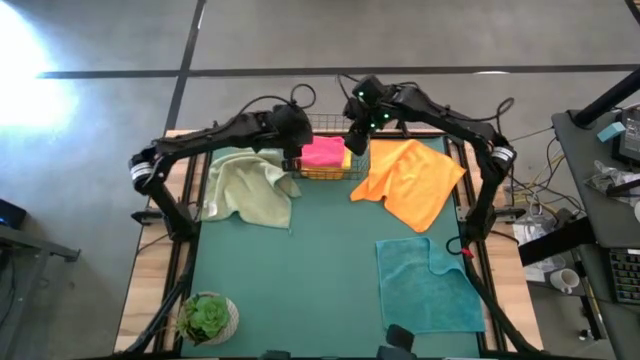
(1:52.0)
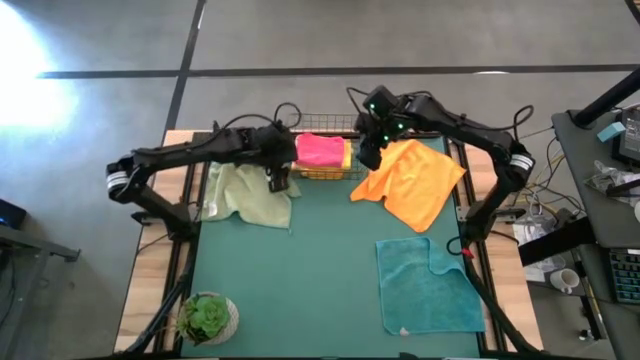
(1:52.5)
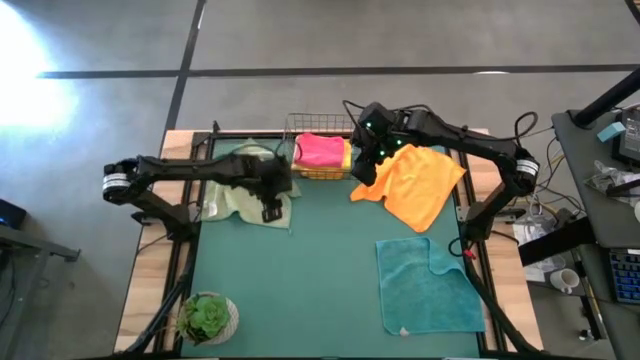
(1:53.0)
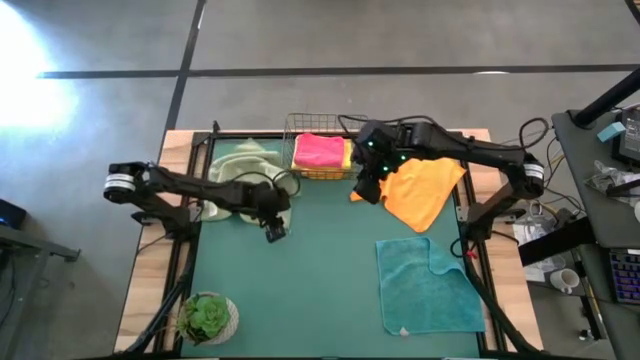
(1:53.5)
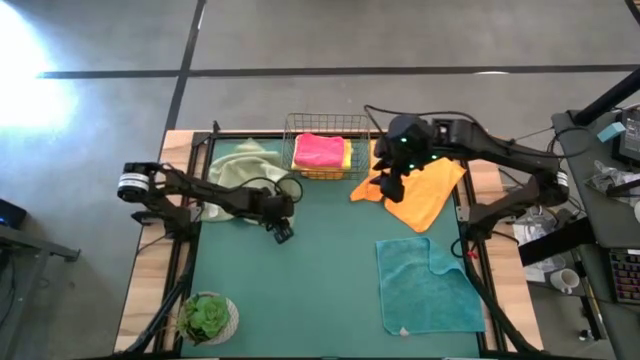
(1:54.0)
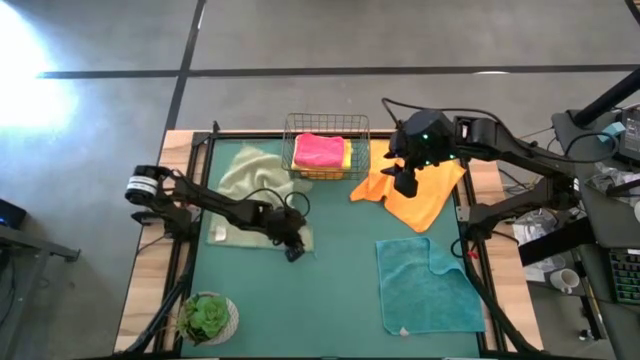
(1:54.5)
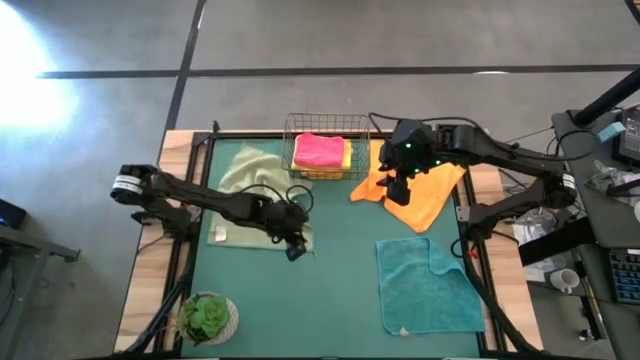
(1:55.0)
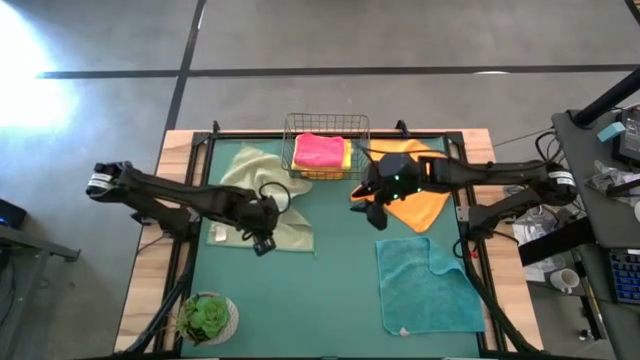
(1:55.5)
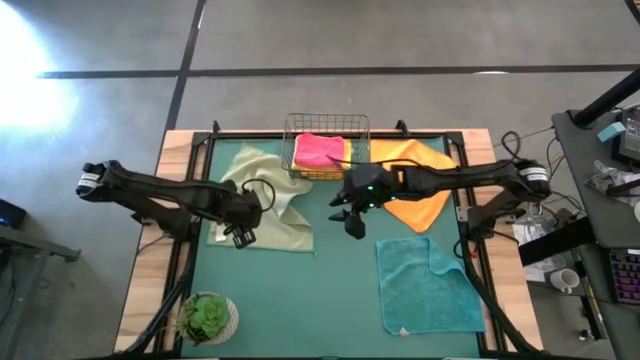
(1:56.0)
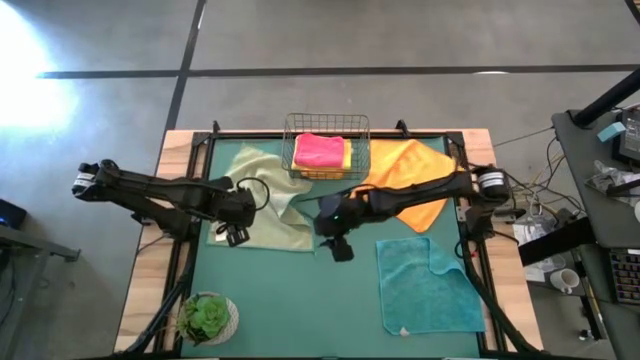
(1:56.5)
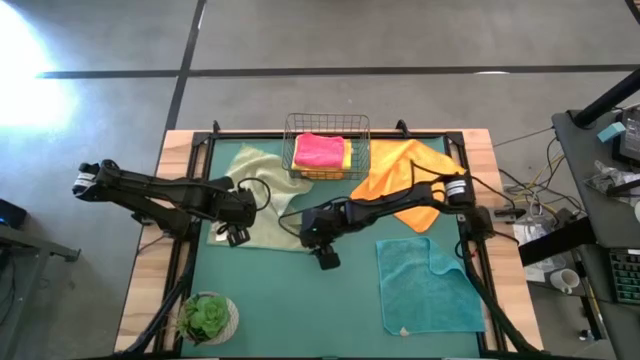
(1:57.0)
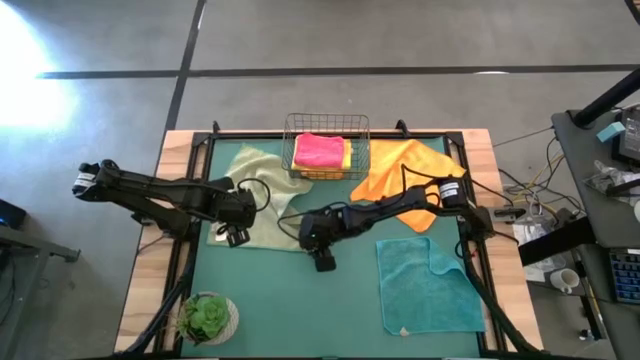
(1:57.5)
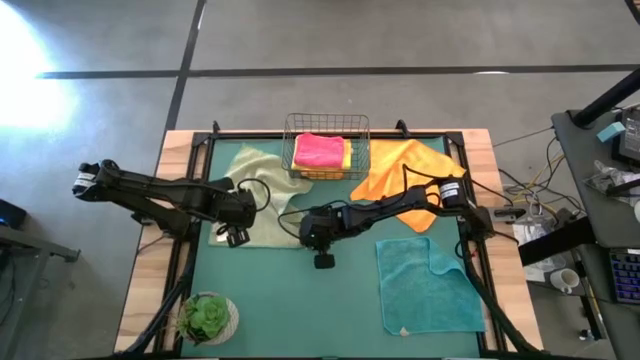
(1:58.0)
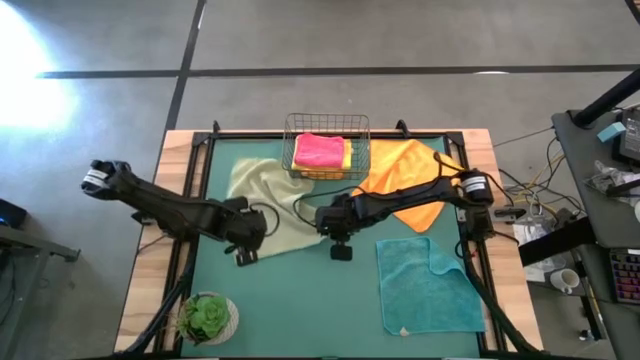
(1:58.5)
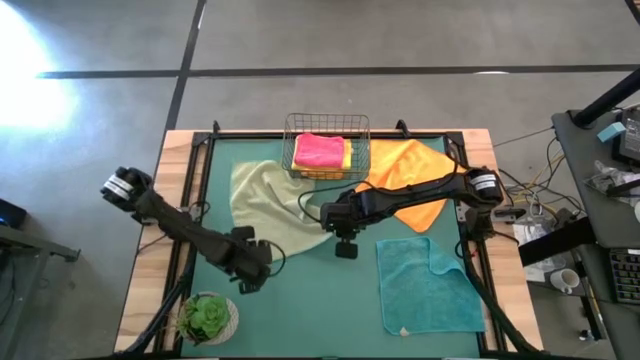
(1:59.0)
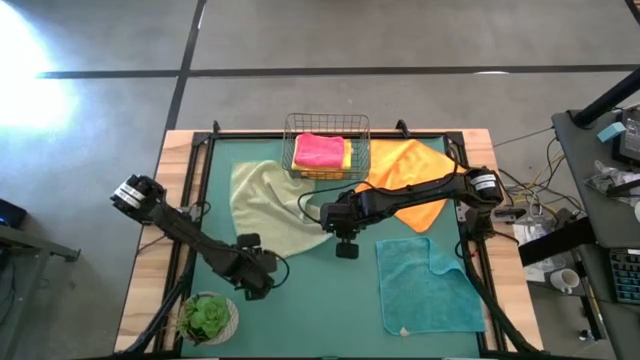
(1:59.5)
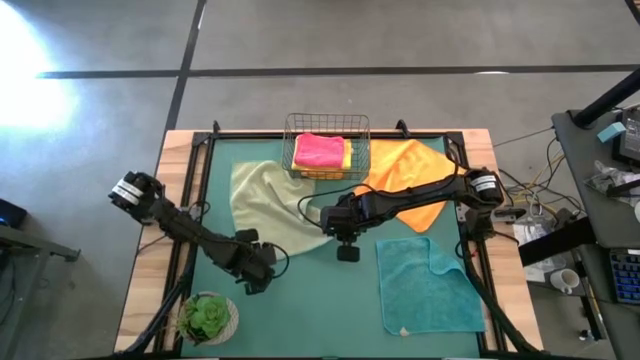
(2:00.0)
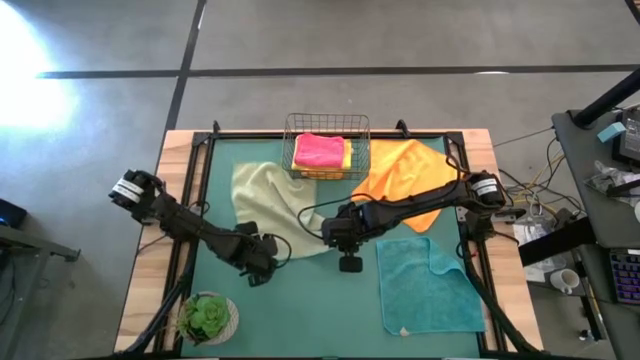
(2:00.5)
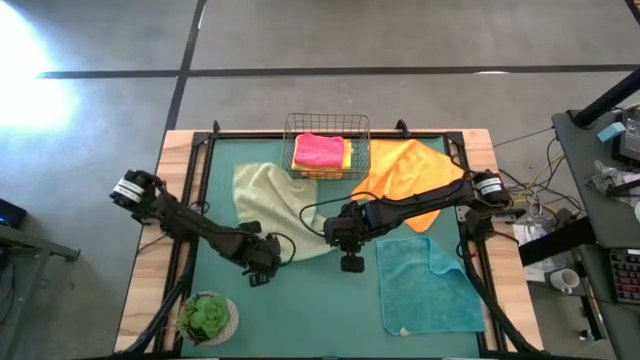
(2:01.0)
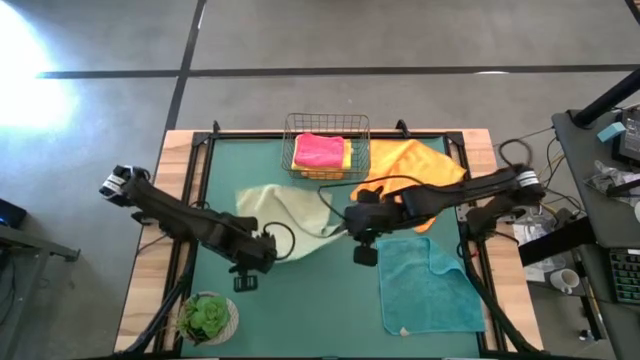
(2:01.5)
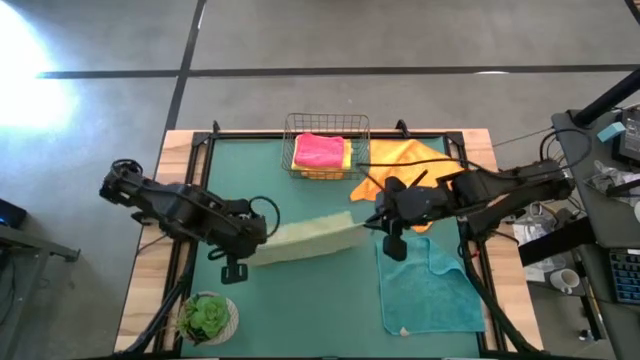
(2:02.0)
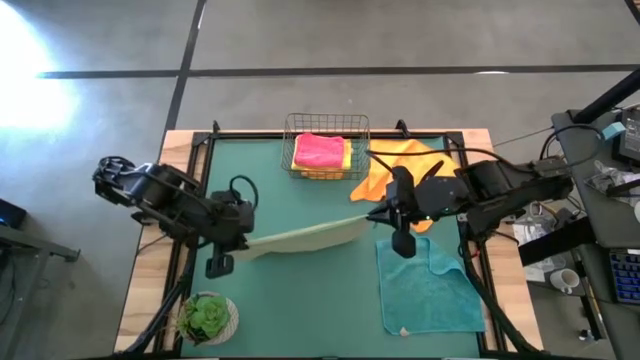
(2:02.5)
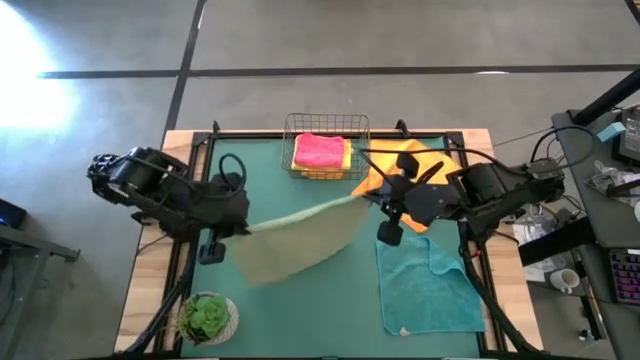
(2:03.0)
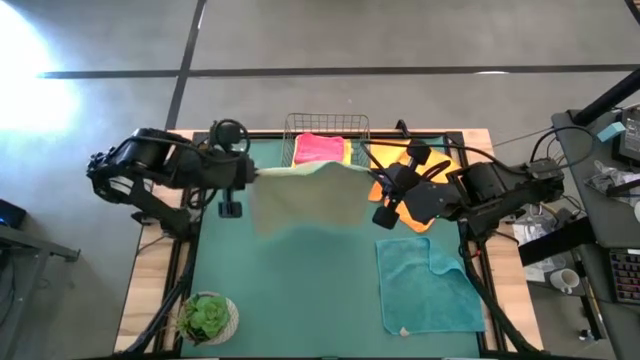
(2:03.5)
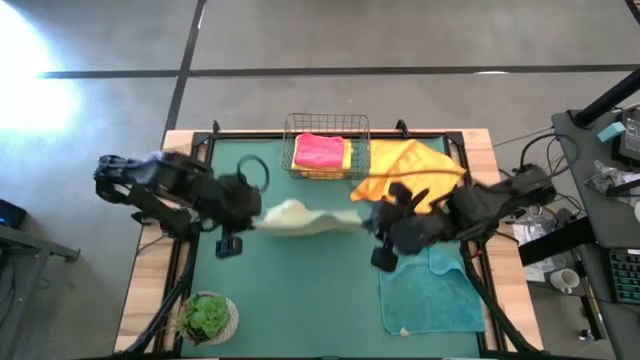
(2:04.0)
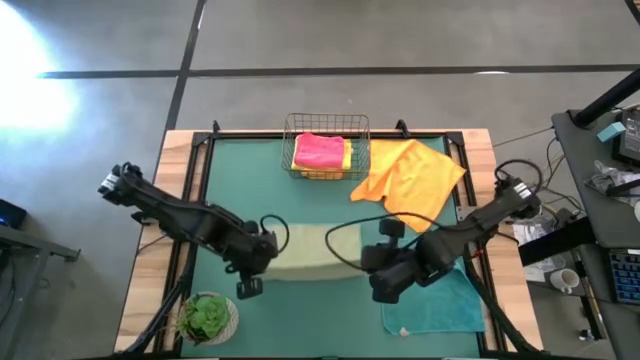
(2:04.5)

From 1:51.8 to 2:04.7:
Task: Fold microfiber towels
Fold the green microfiber towel

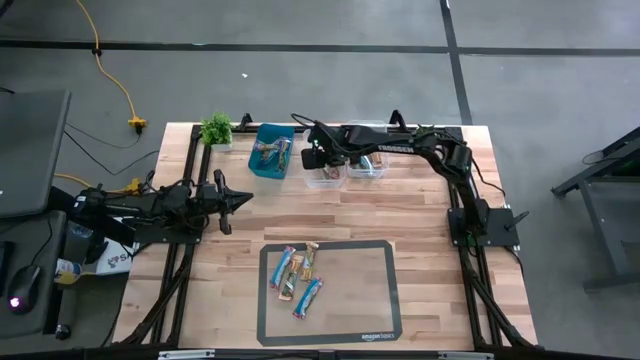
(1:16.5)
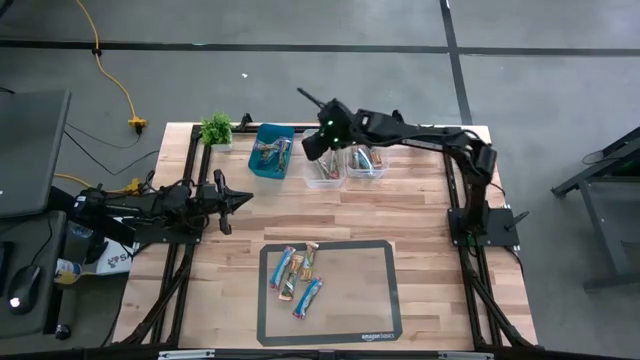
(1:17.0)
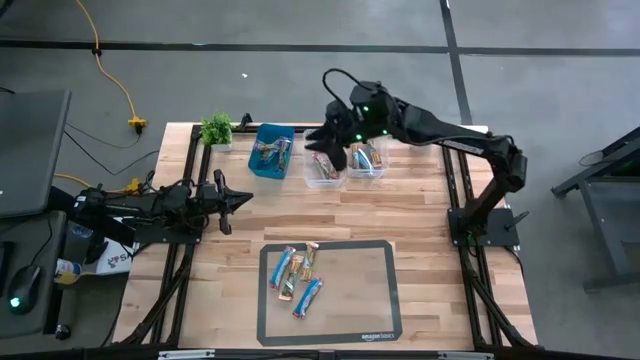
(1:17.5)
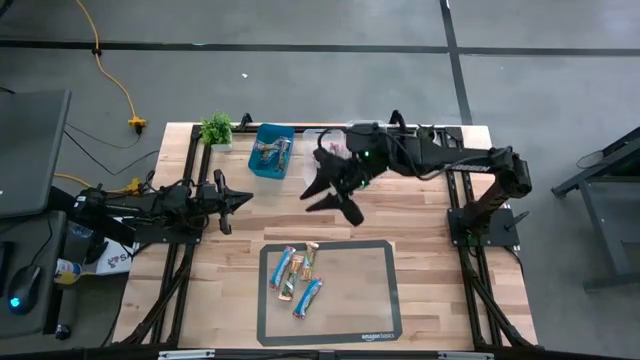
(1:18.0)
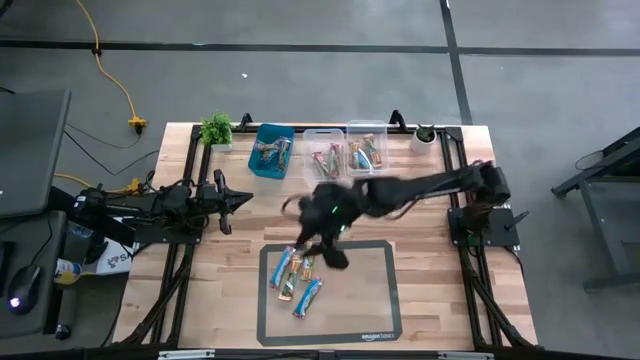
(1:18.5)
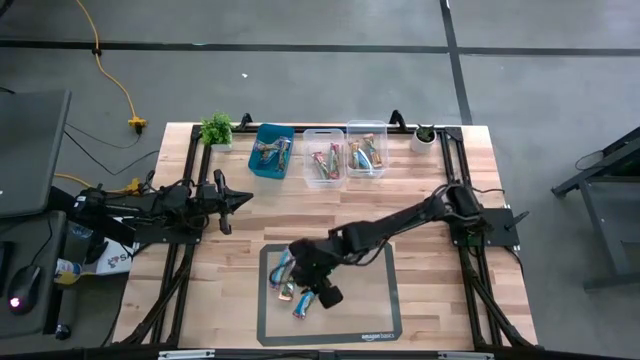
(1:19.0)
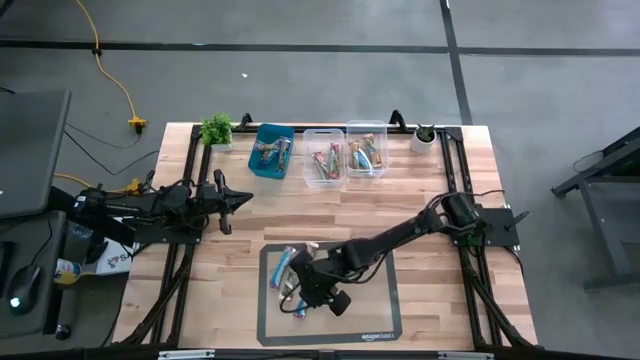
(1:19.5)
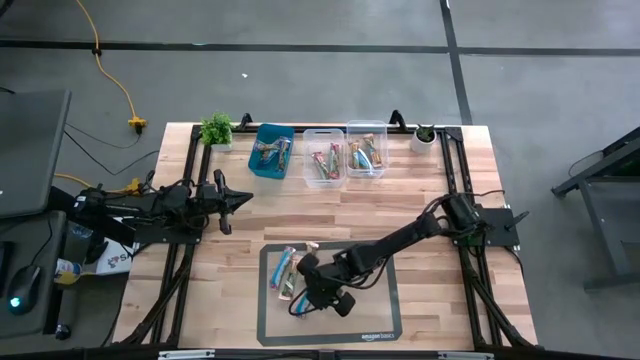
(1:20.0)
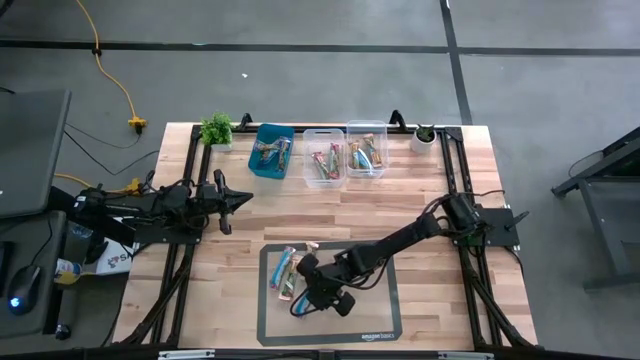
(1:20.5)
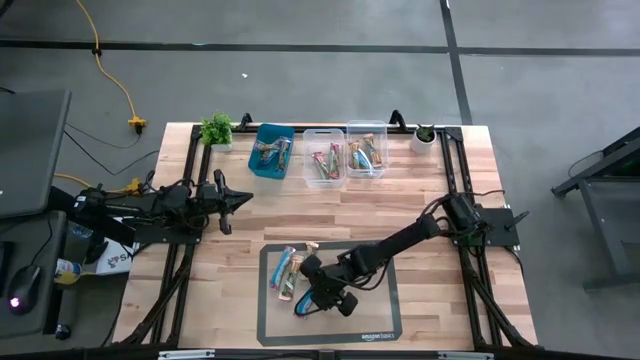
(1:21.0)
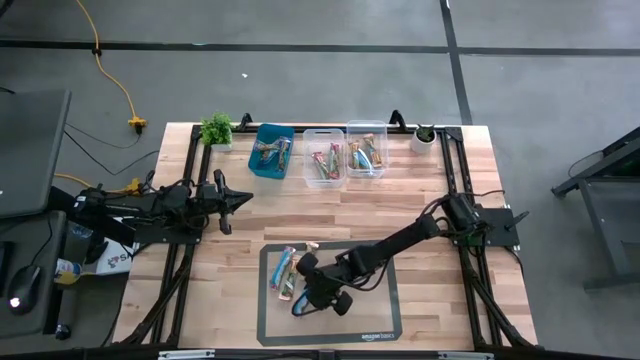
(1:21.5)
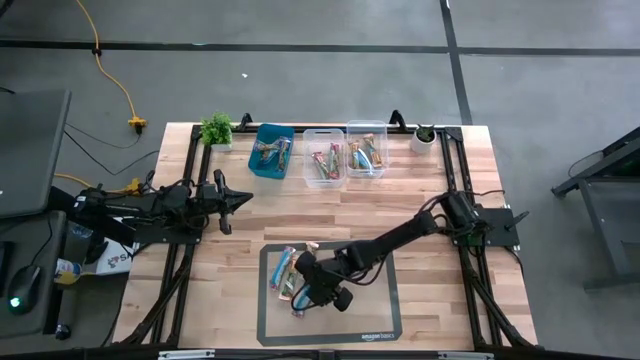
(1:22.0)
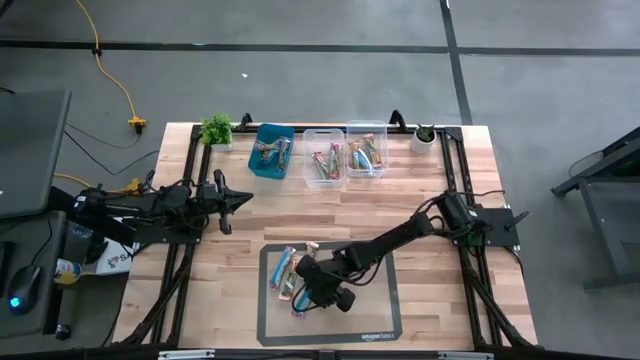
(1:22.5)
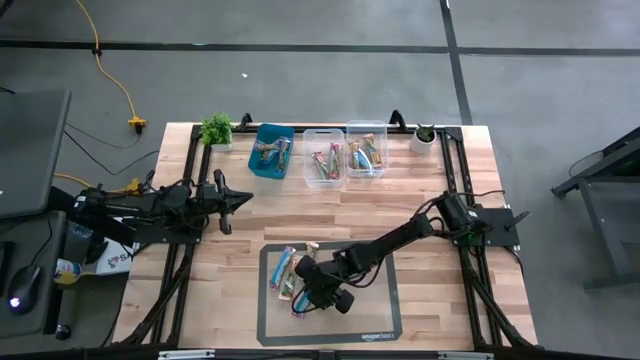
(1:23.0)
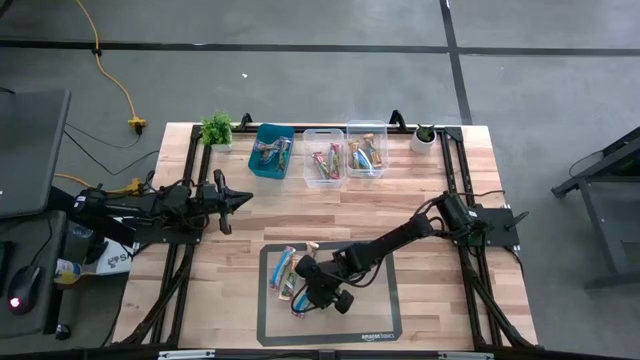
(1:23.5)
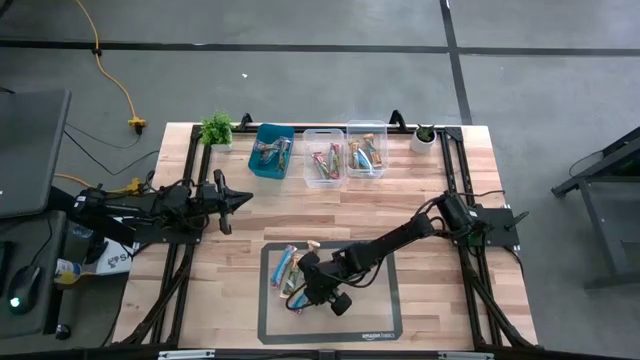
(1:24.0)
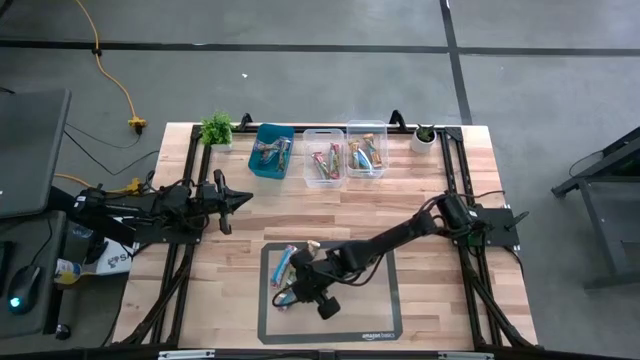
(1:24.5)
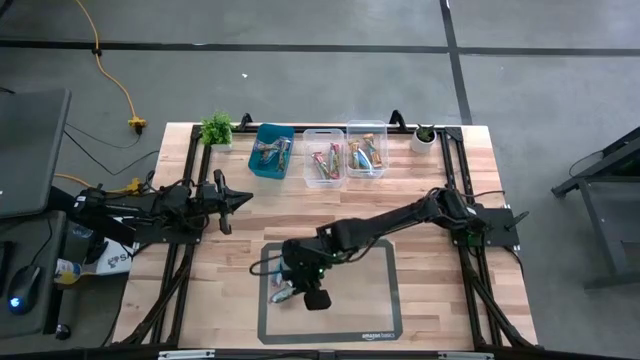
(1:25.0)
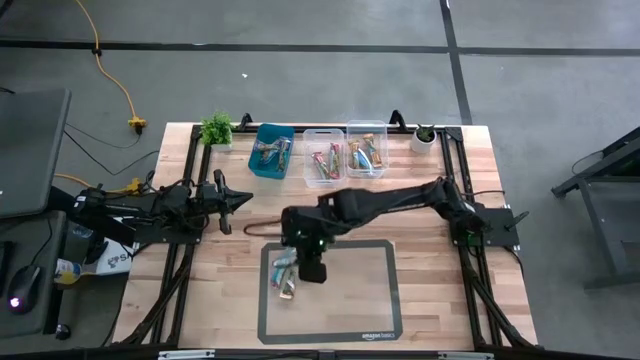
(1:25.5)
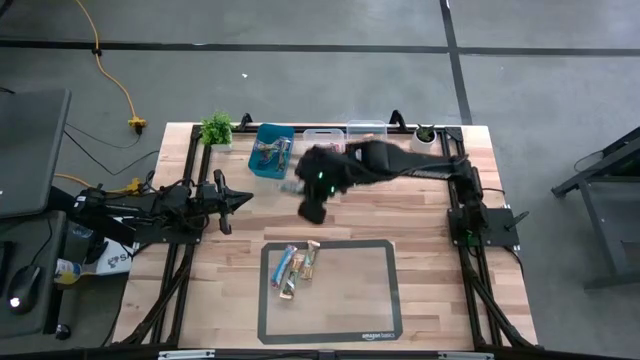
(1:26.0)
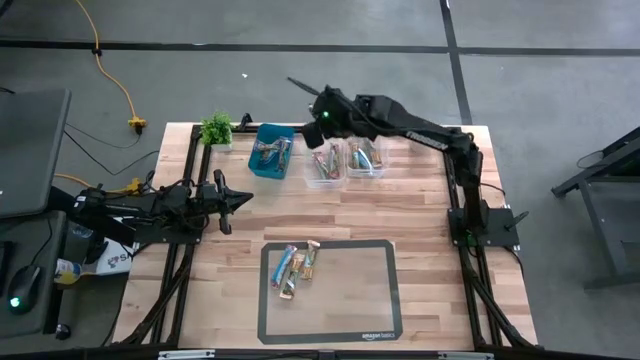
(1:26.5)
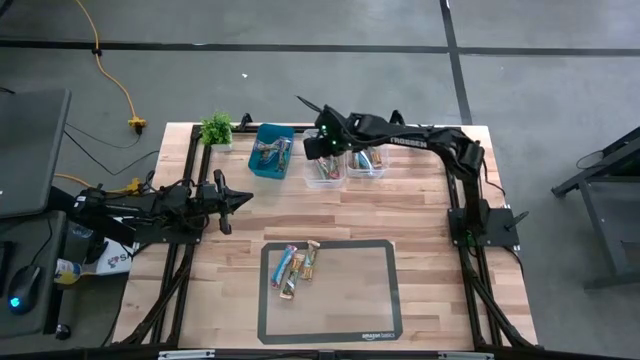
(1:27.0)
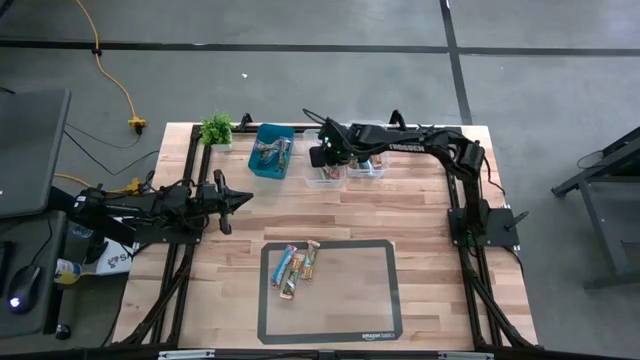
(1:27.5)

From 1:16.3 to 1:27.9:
Task: Pick and place Granola Bars by type
Put the bottom red granola bar into the left transparent bin
